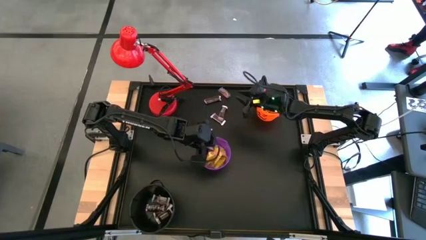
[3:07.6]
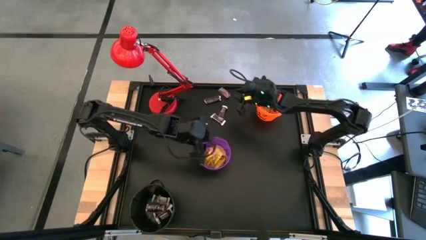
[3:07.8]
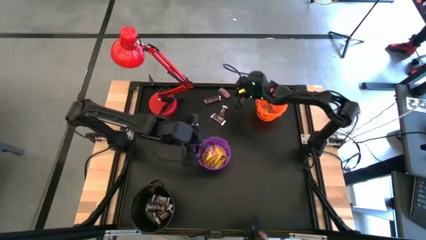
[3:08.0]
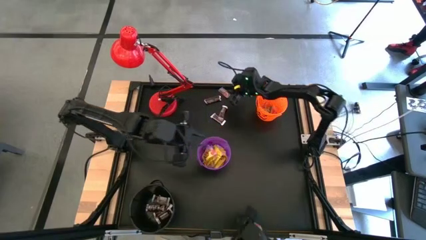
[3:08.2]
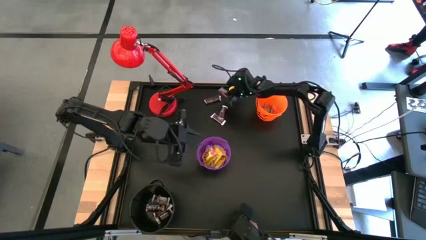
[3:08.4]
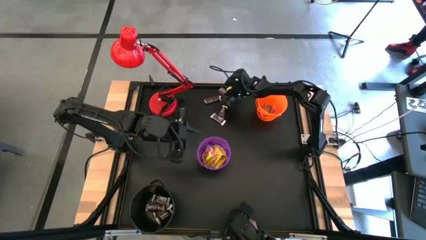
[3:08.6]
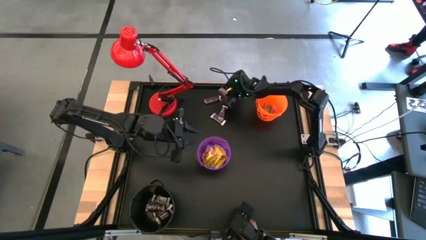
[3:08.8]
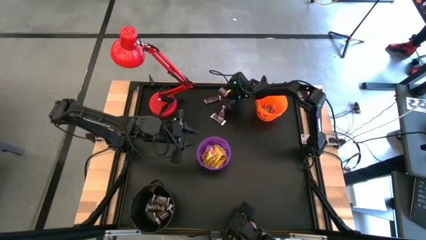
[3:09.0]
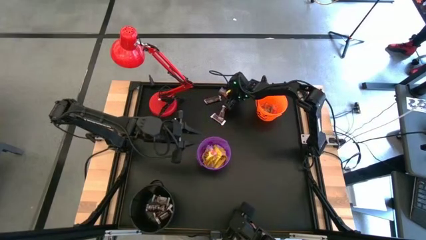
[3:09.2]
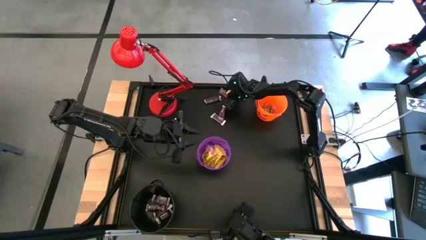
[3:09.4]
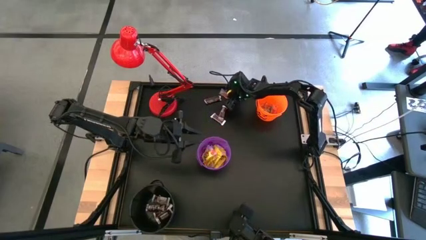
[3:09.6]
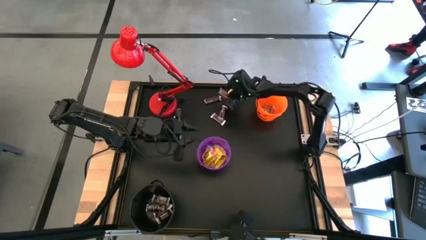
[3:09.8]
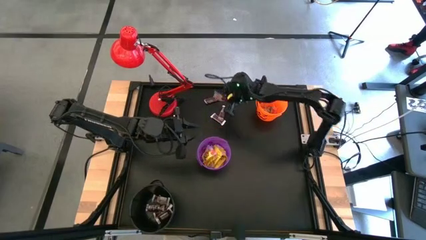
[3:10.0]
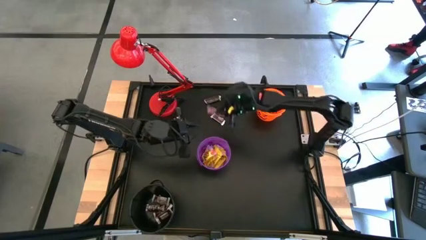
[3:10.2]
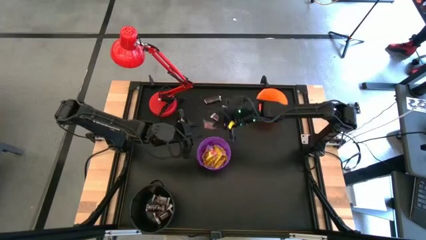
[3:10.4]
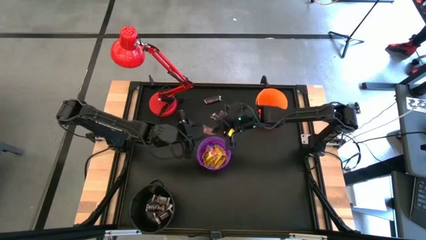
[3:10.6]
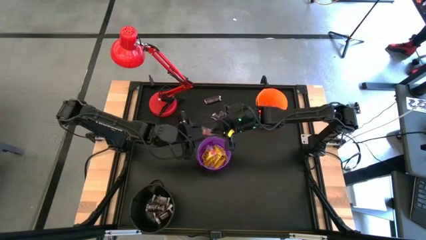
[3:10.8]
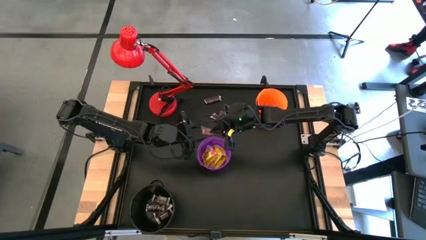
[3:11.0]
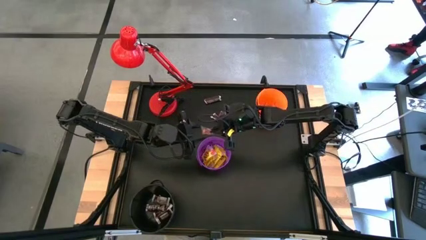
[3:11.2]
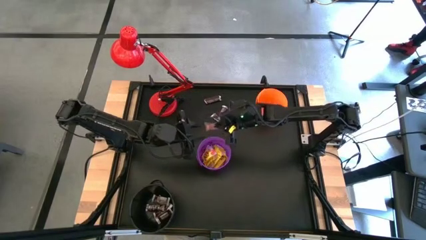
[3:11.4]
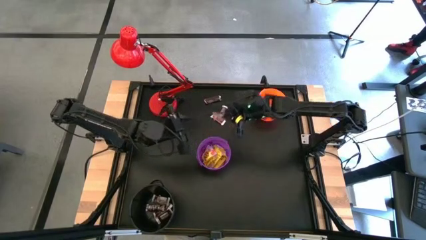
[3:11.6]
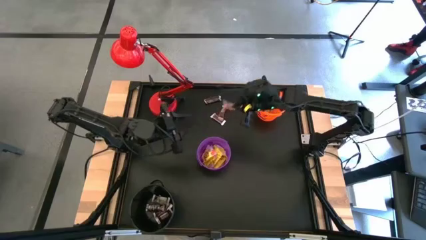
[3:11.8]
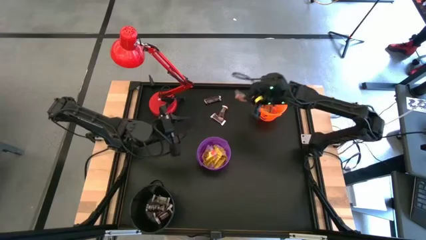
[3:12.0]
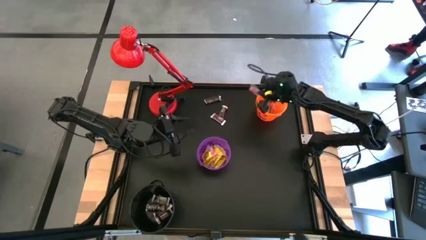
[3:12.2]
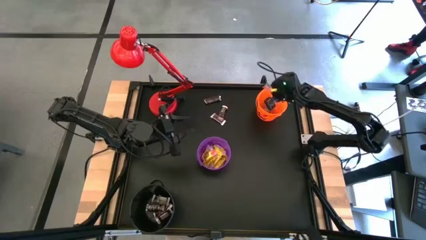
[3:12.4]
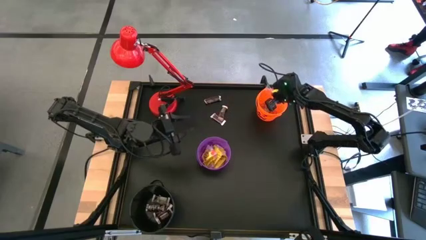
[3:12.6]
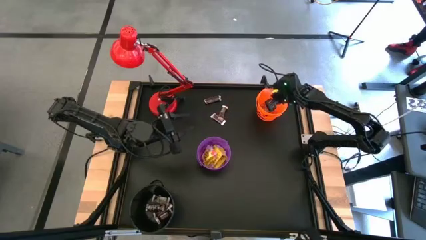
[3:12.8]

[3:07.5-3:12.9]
Task: Sort candy
Put the red gummy into the orange bucket

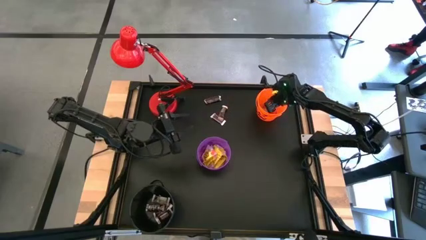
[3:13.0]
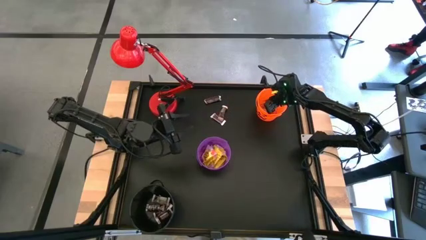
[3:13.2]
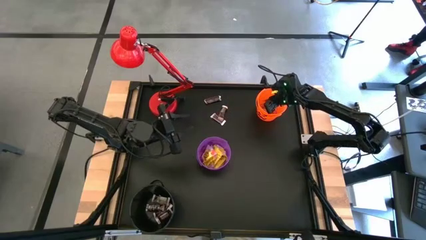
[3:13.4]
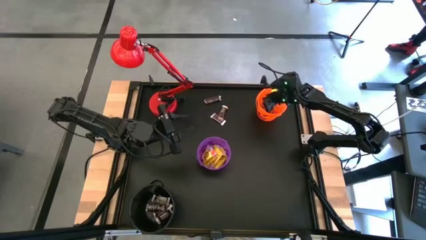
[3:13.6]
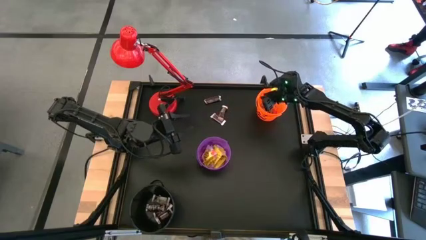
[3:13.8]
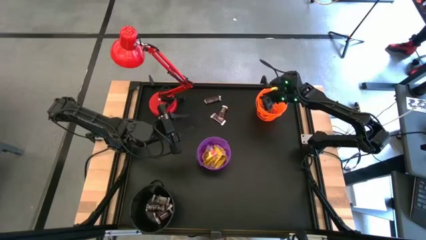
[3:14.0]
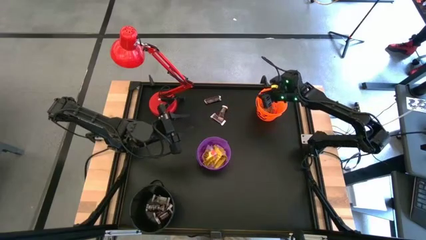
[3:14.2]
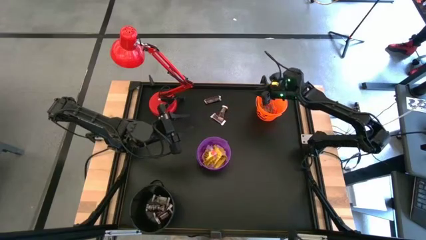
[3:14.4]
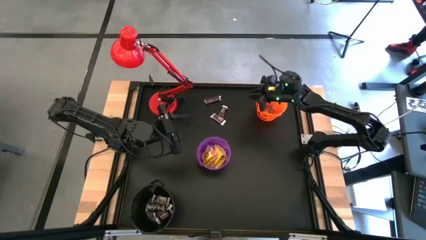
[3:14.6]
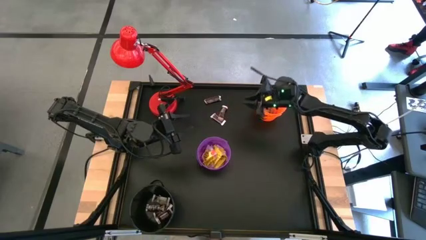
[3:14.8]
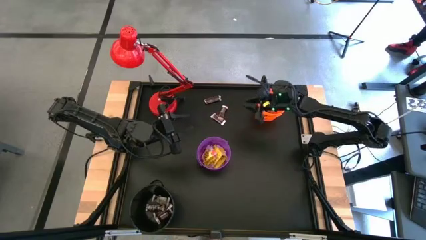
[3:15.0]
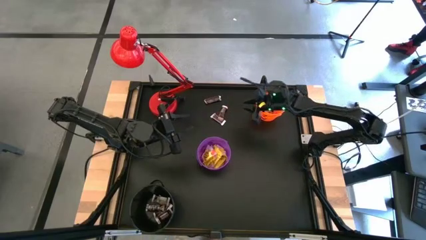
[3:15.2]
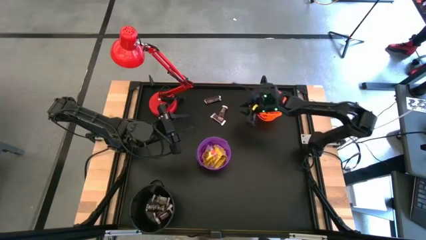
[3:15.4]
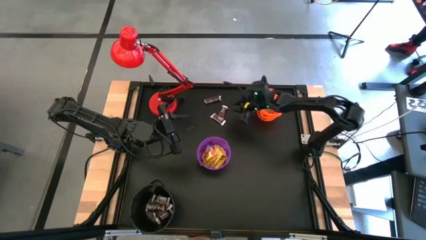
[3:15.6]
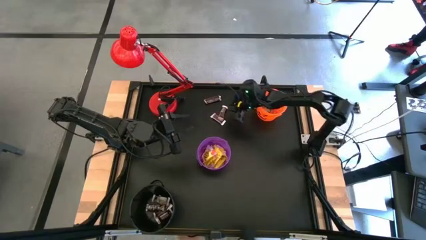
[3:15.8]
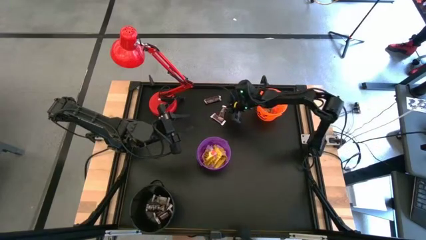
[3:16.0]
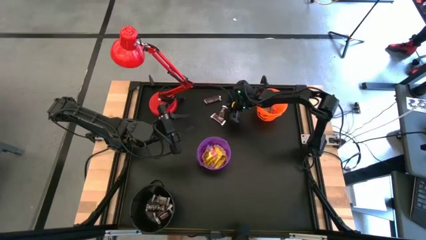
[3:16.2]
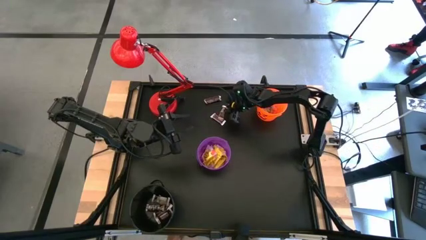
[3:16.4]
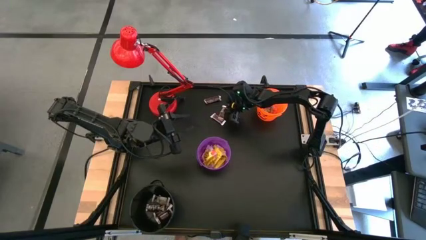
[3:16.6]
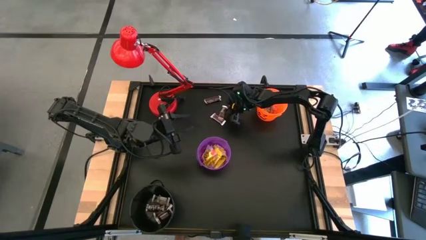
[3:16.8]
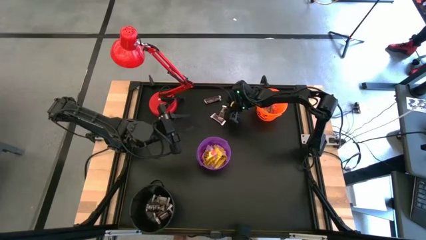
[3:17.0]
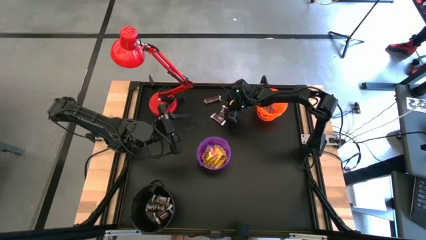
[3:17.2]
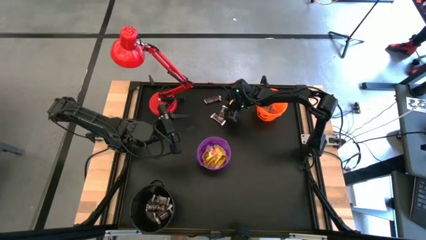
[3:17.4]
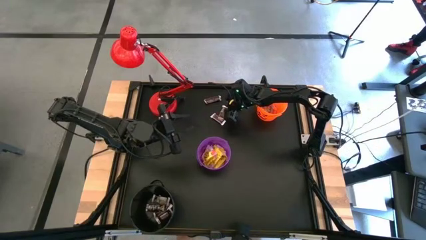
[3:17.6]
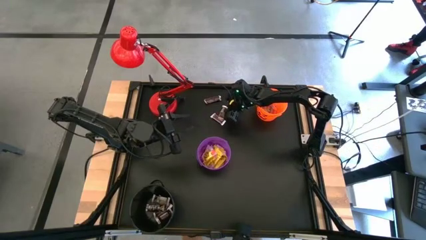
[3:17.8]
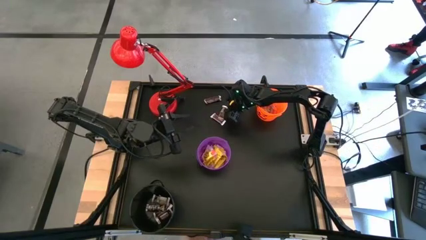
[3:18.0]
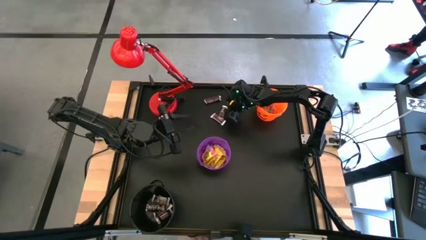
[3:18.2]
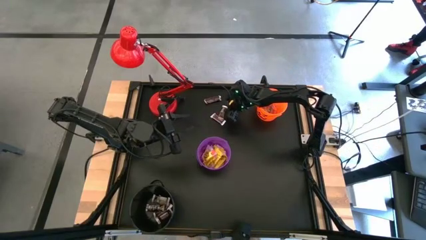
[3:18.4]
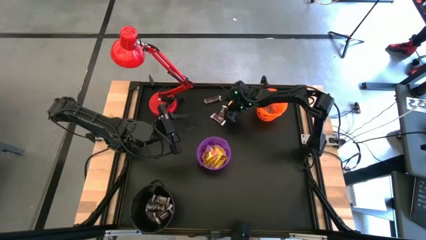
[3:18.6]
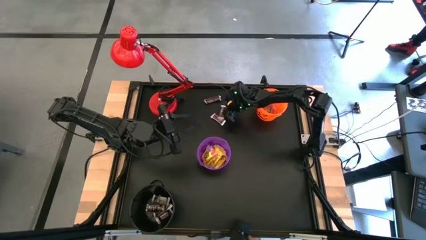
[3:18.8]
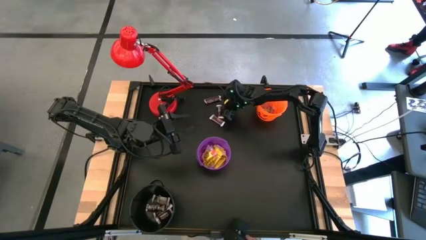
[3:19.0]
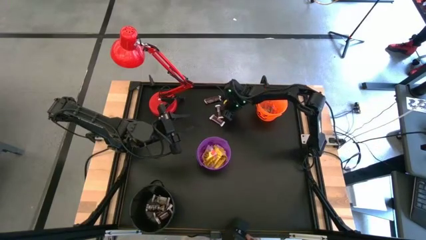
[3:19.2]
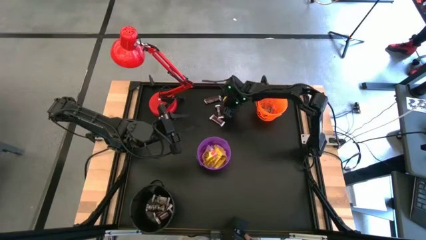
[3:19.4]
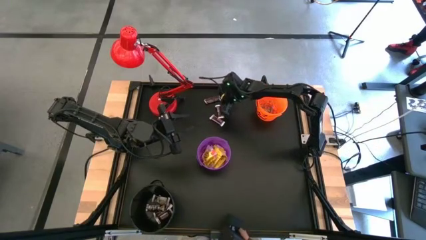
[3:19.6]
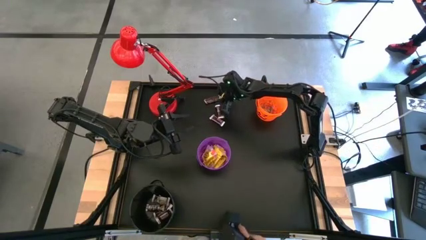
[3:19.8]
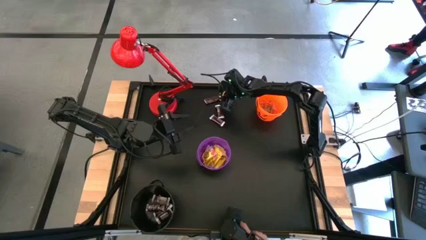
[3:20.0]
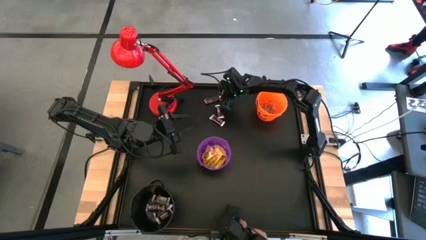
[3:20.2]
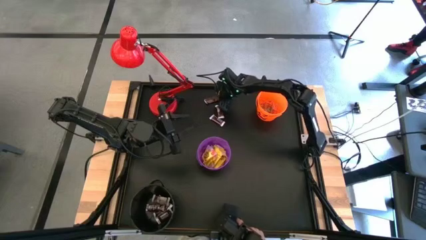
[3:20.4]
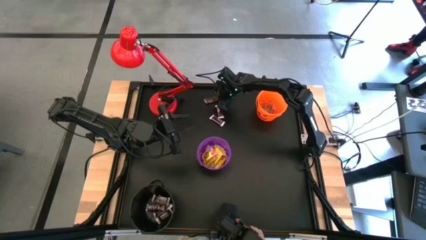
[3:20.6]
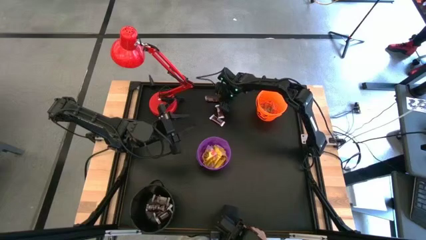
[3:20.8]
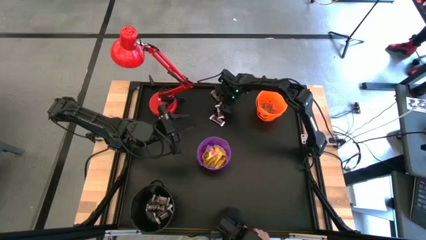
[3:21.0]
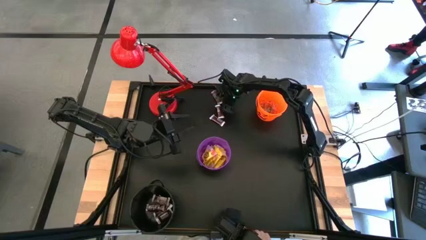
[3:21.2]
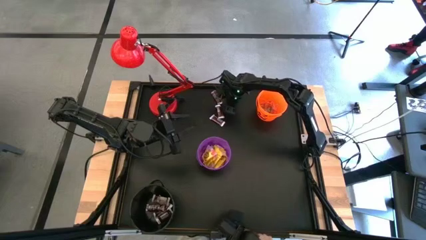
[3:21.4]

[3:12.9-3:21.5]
Put the brown chocolate bar into the black bucket

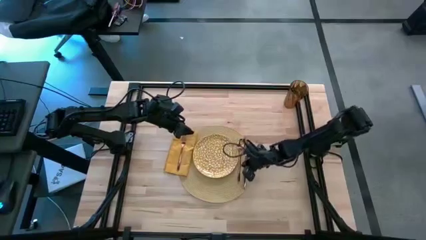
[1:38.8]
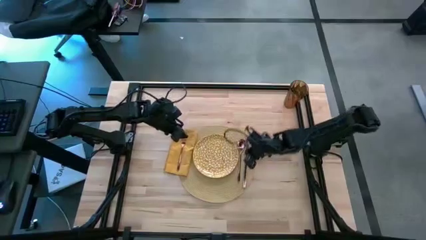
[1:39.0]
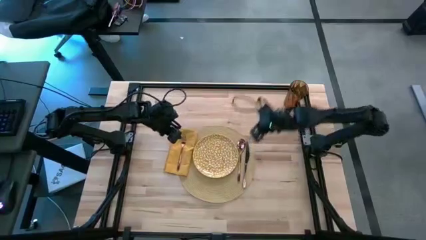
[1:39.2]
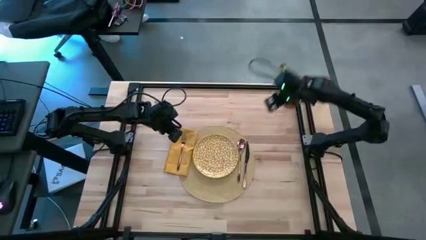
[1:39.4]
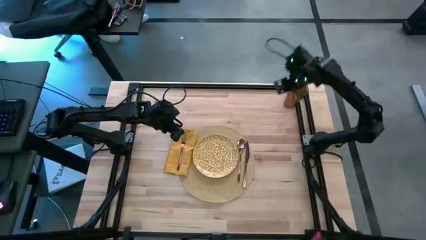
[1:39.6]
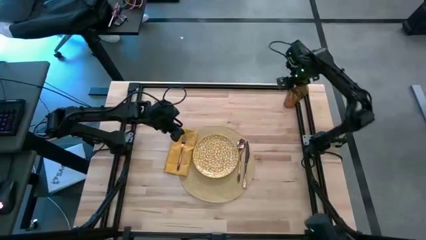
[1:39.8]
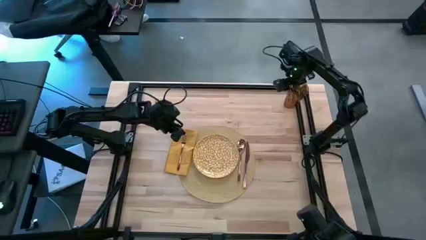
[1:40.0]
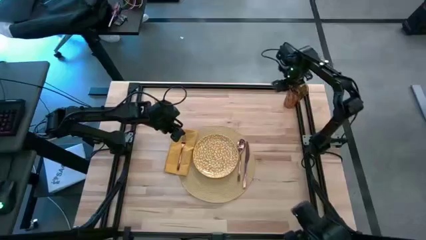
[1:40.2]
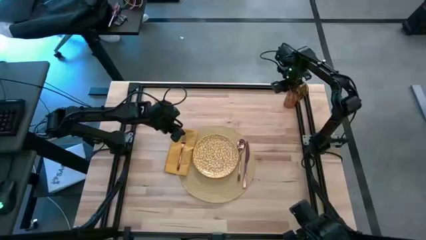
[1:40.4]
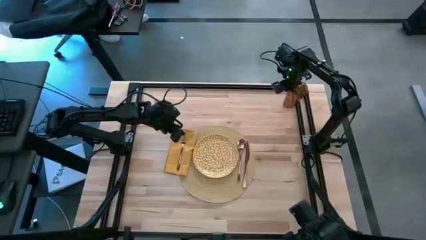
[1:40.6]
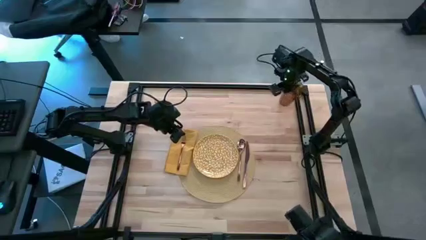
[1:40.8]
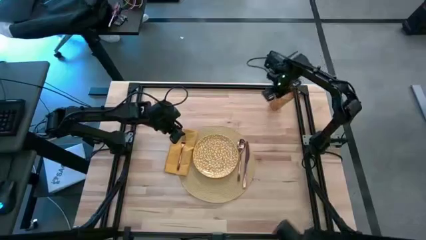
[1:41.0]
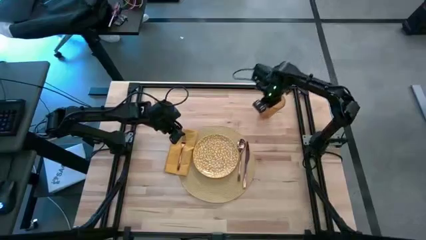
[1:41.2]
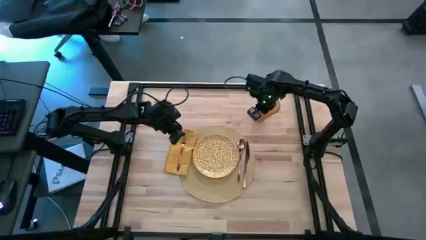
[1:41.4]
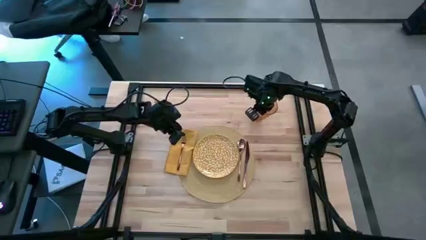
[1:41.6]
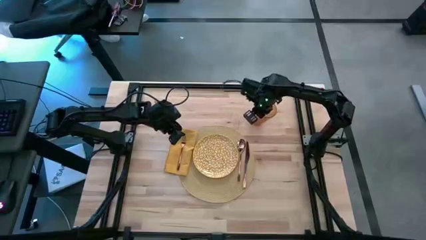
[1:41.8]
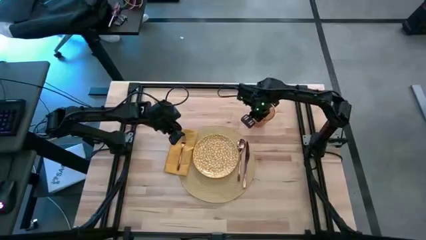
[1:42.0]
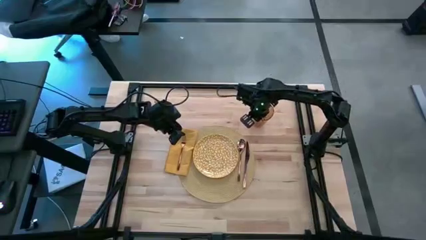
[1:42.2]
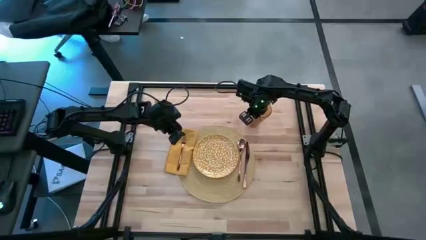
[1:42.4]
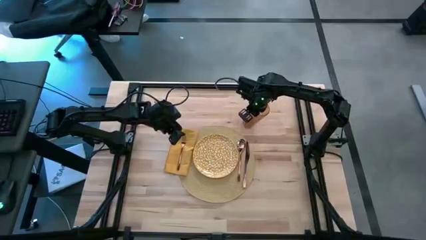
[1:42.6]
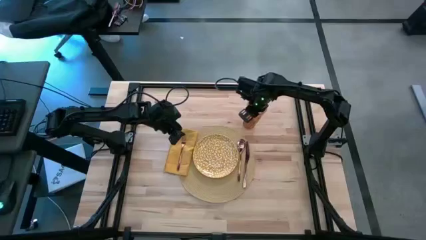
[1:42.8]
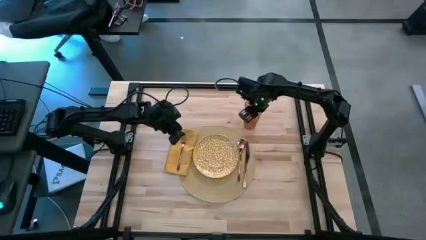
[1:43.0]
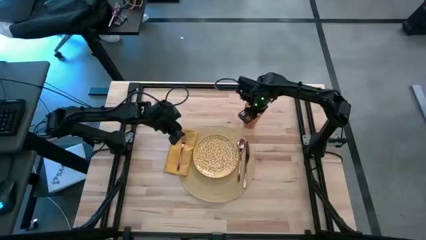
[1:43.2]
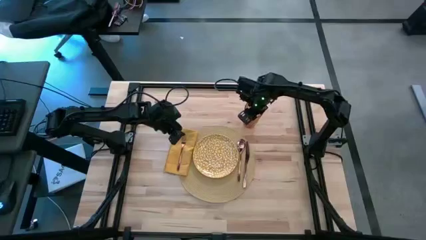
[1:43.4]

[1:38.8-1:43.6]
Task: Set table place
Put the brown cup to the top right of the table
